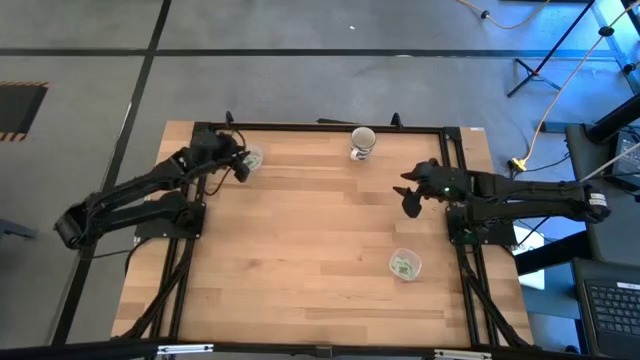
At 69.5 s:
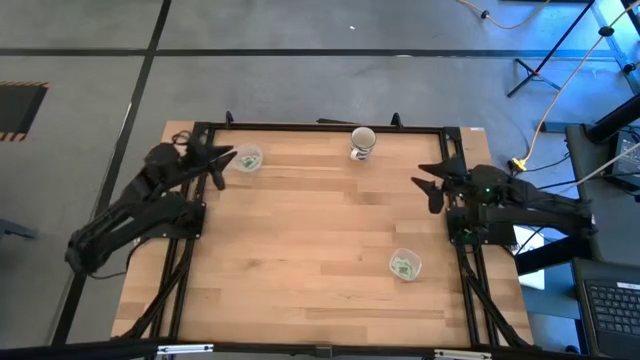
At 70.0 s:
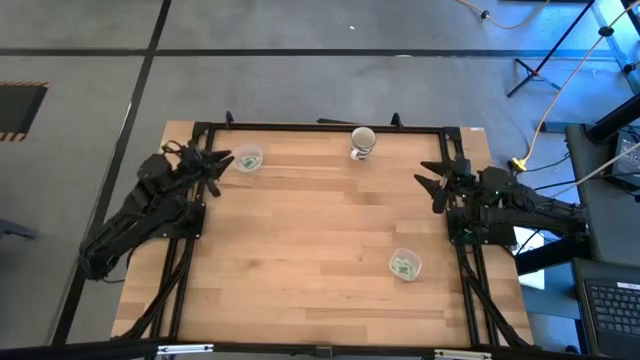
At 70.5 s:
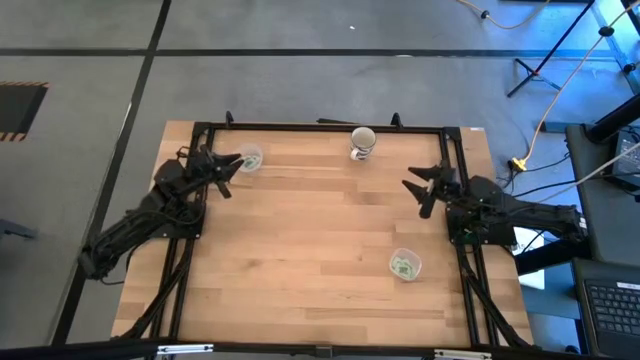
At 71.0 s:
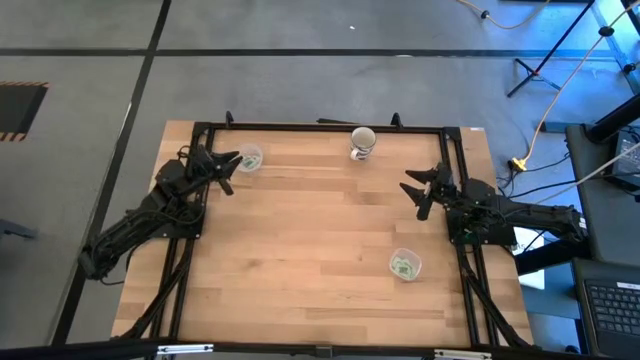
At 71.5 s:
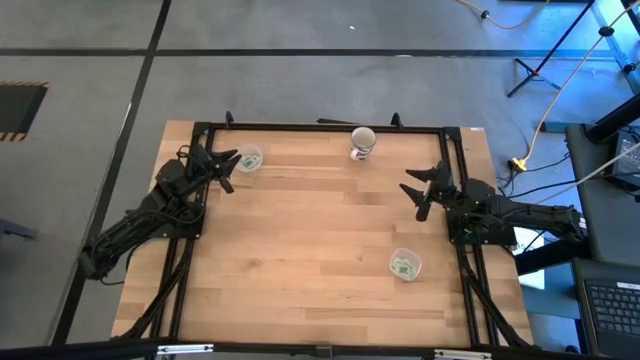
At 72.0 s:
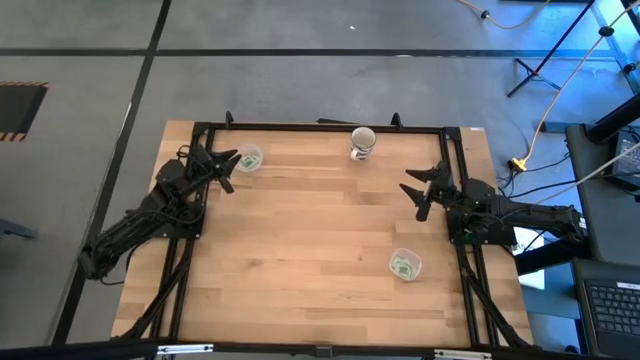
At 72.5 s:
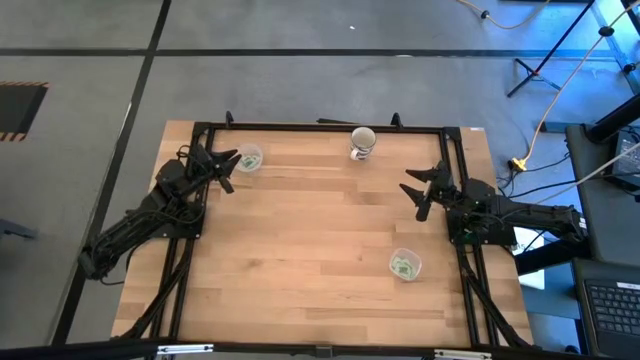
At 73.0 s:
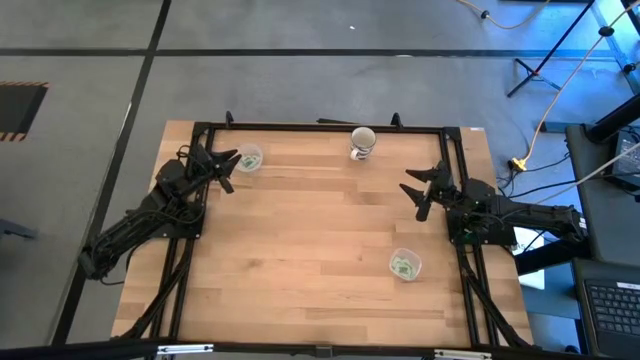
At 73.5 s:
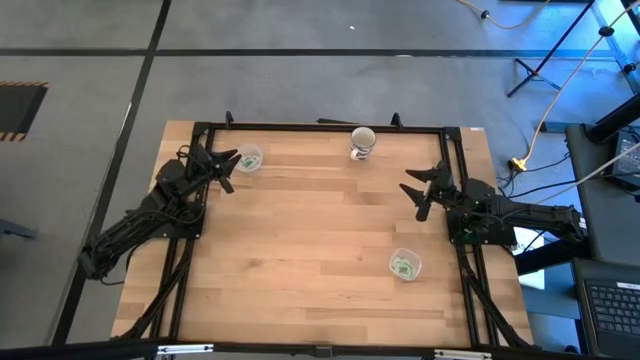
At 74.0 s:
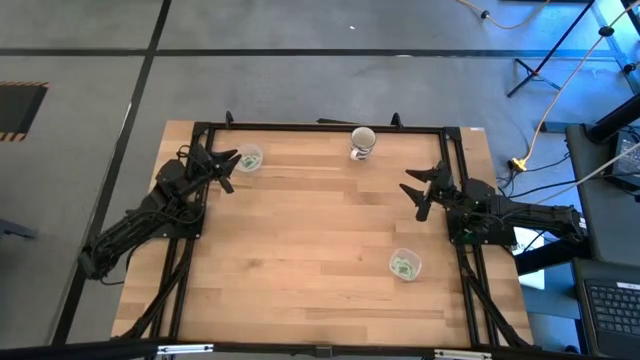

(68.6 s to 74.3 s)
Task: Pick and place items into bin
Return to Home Position

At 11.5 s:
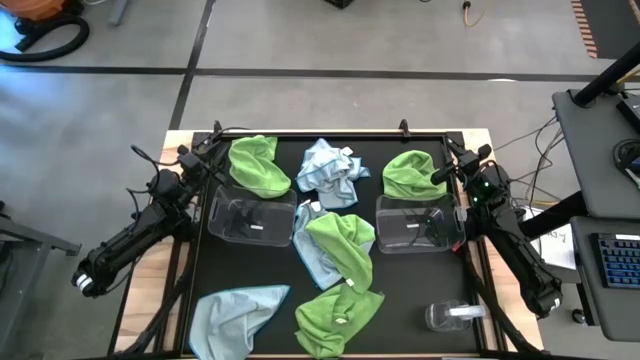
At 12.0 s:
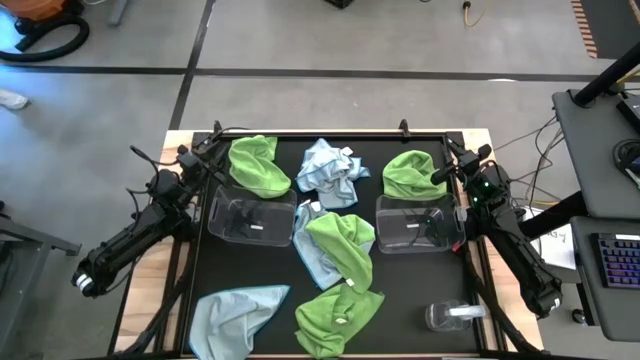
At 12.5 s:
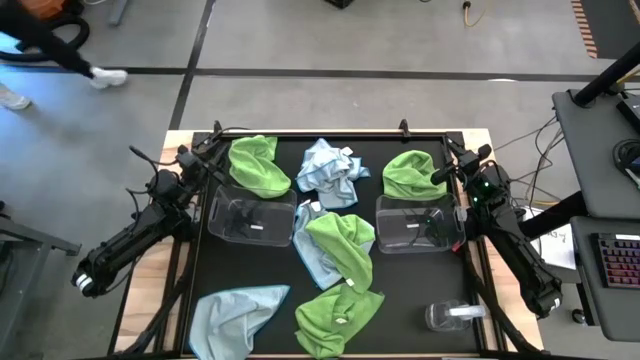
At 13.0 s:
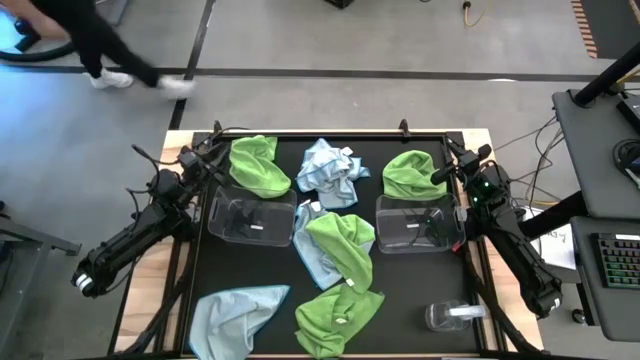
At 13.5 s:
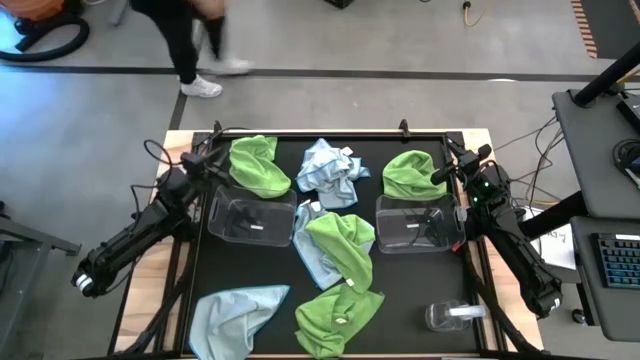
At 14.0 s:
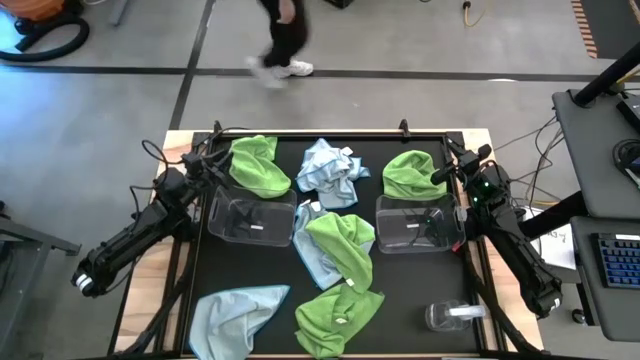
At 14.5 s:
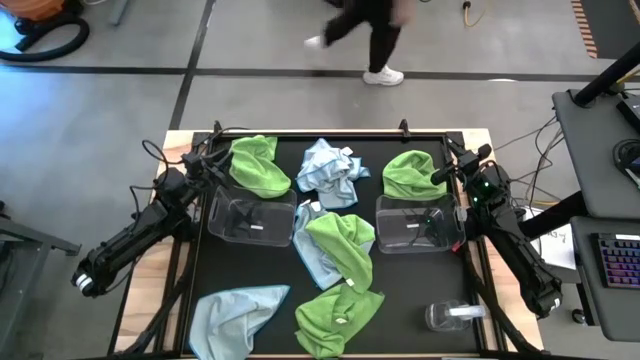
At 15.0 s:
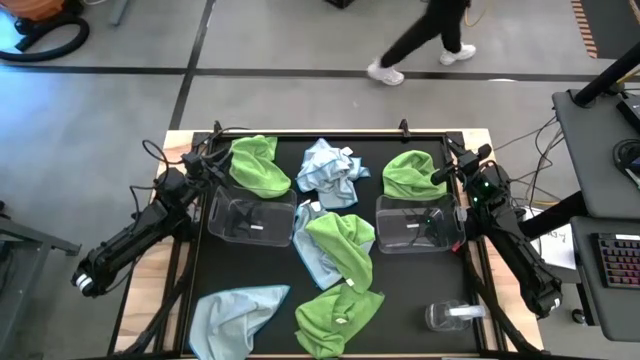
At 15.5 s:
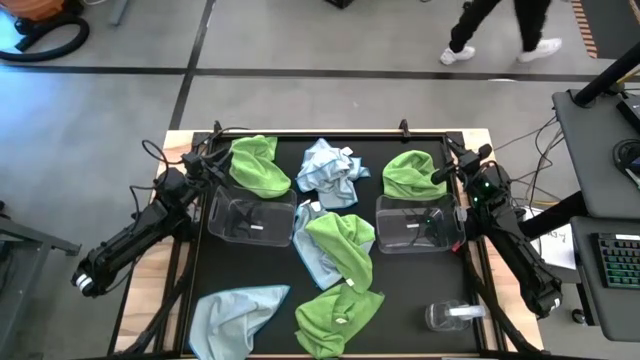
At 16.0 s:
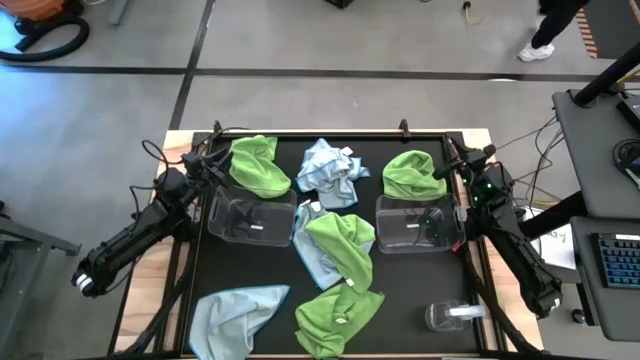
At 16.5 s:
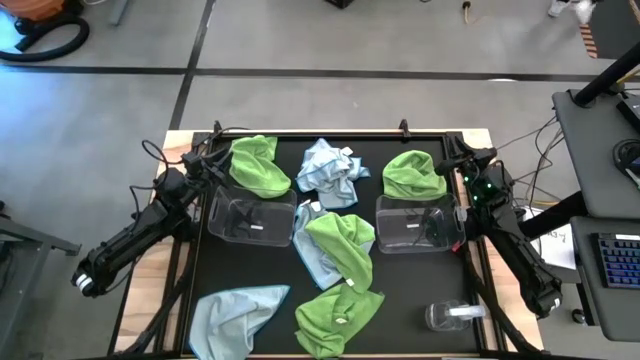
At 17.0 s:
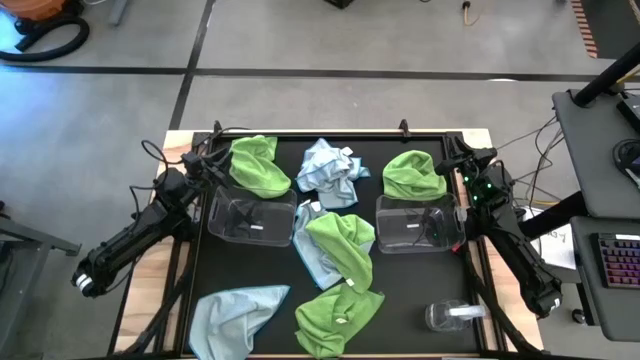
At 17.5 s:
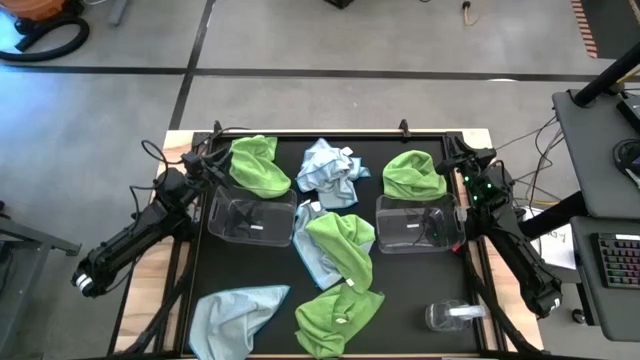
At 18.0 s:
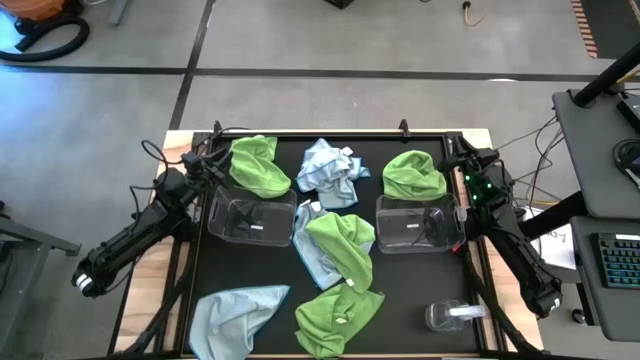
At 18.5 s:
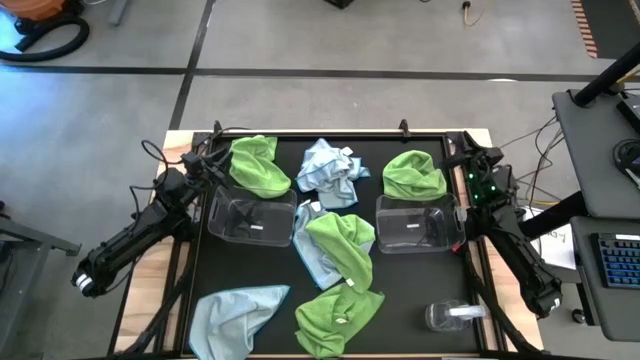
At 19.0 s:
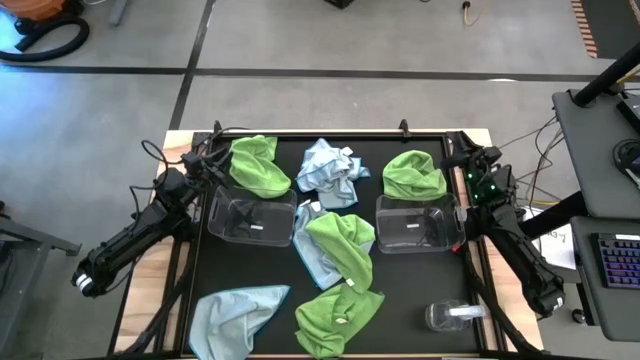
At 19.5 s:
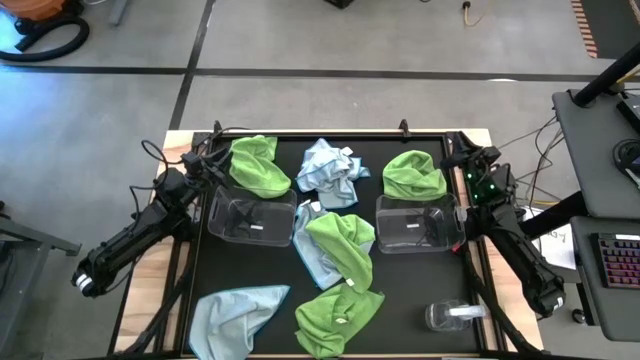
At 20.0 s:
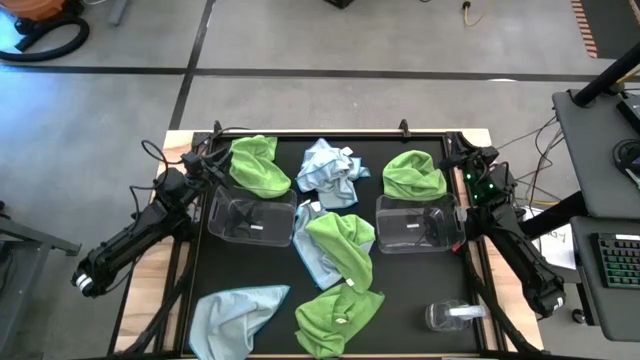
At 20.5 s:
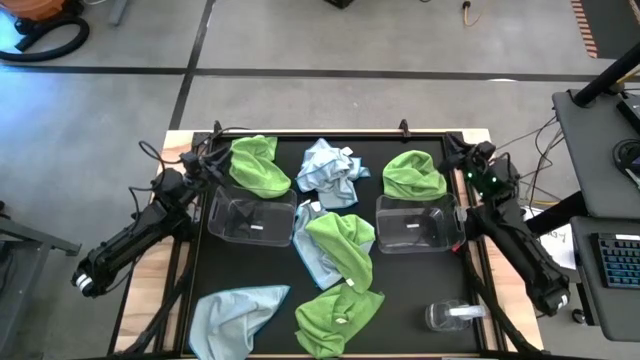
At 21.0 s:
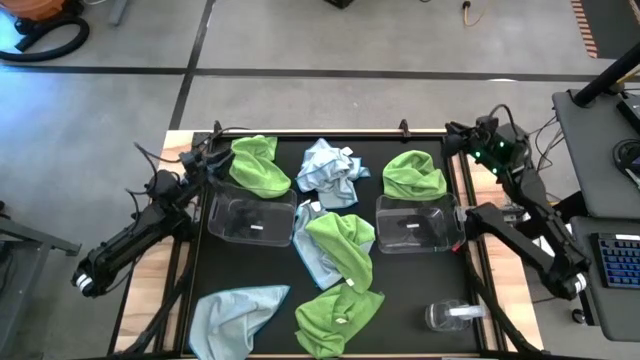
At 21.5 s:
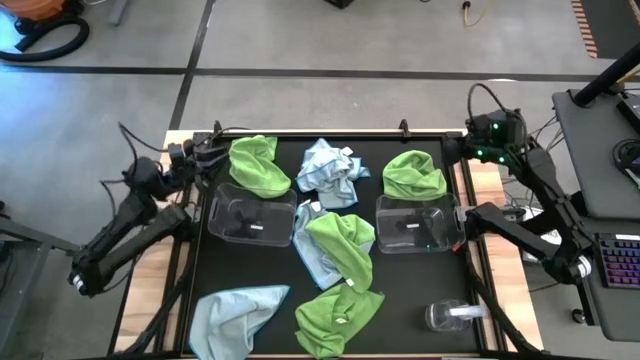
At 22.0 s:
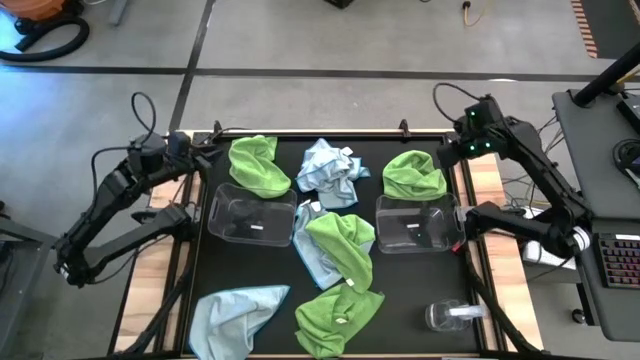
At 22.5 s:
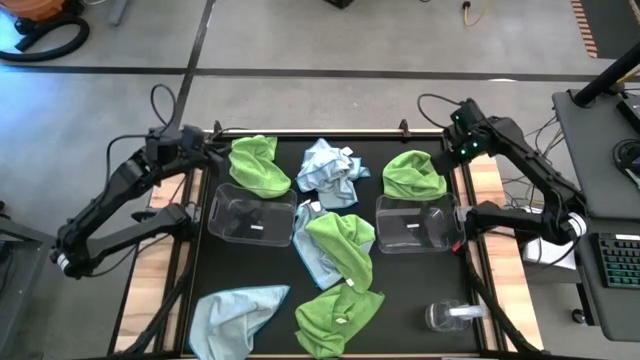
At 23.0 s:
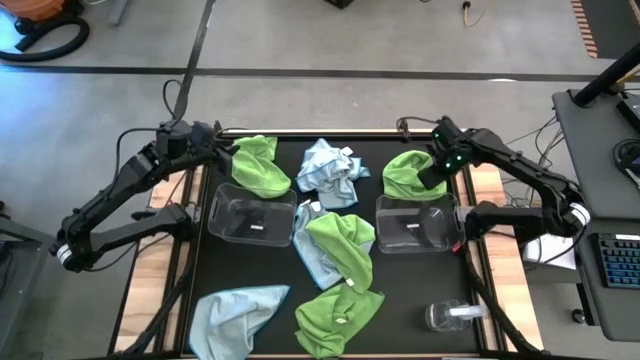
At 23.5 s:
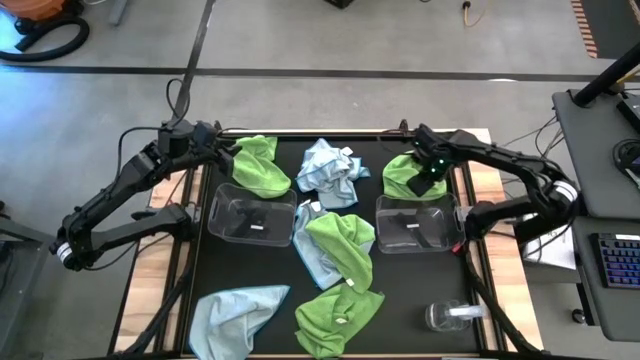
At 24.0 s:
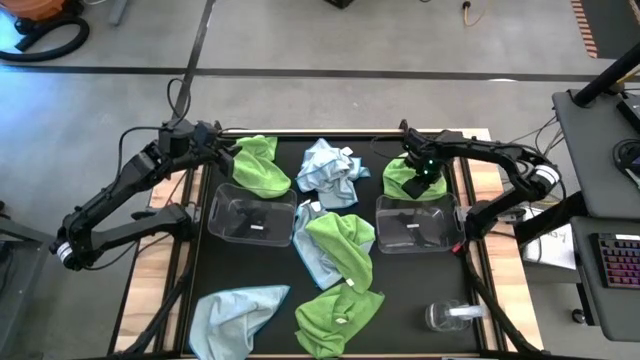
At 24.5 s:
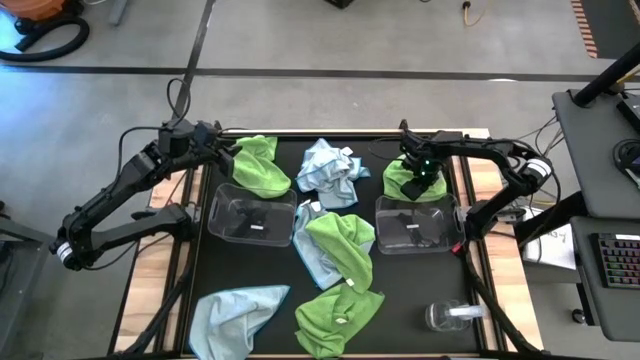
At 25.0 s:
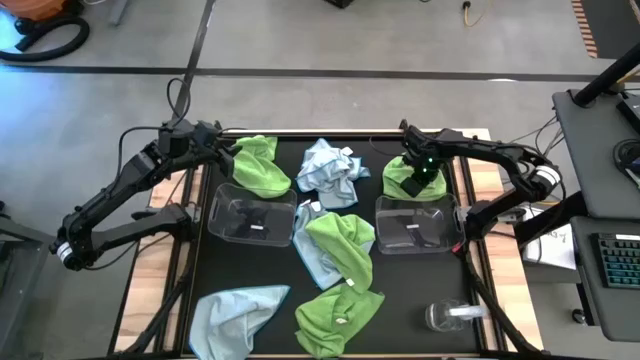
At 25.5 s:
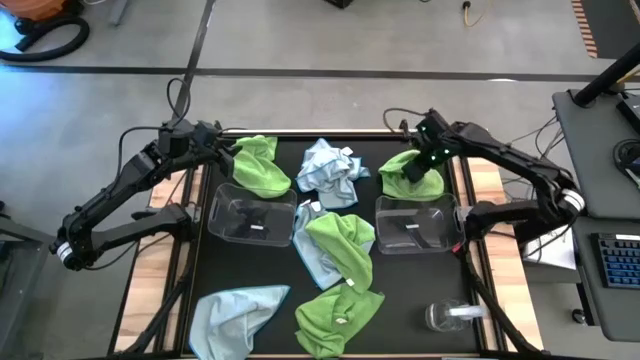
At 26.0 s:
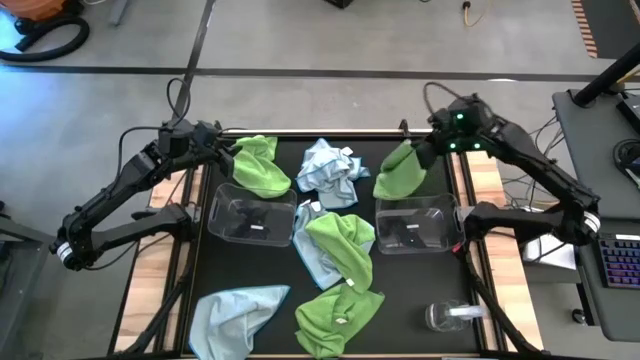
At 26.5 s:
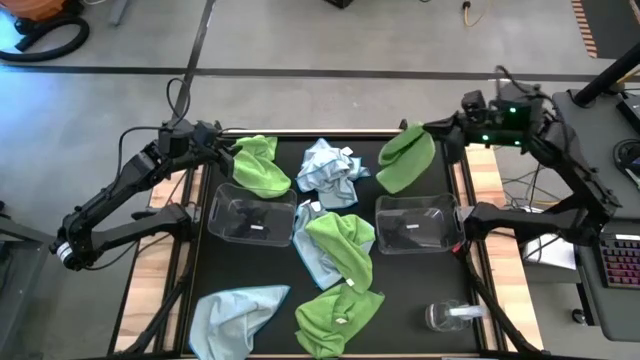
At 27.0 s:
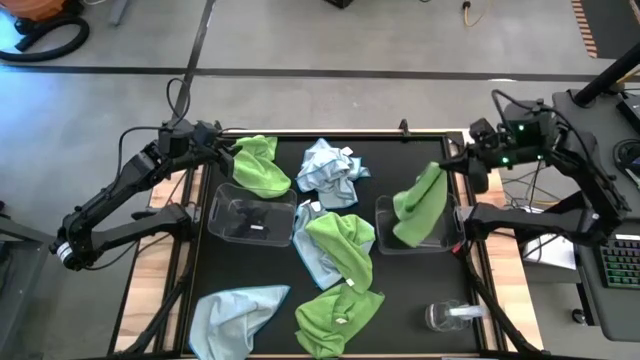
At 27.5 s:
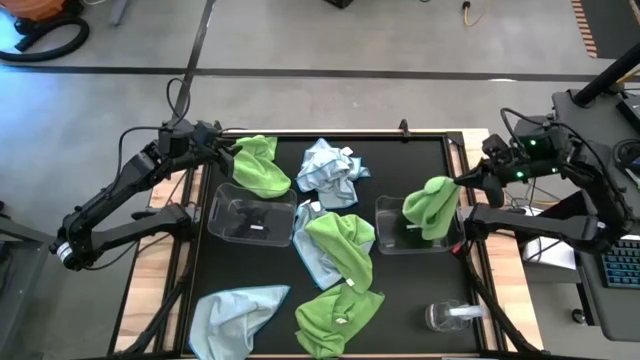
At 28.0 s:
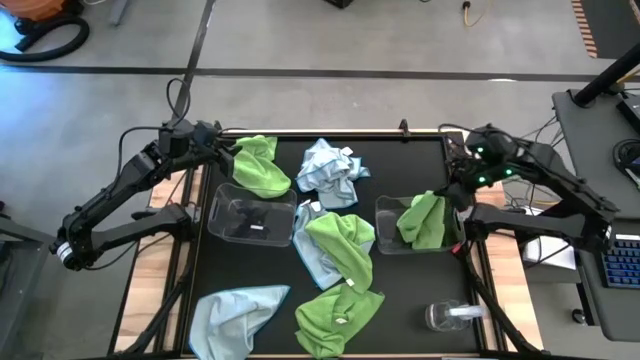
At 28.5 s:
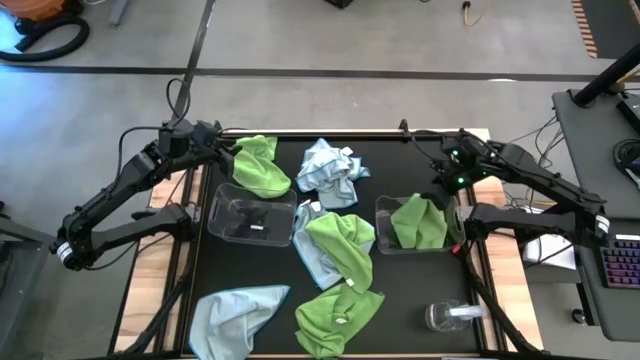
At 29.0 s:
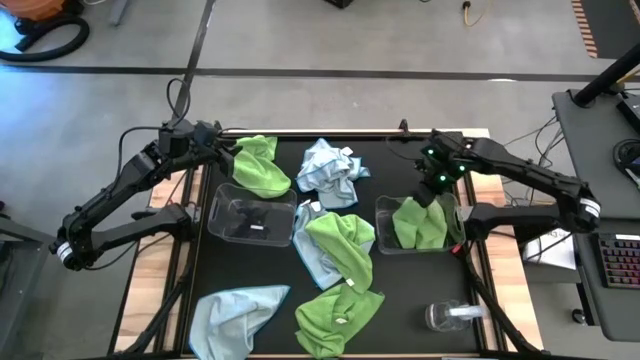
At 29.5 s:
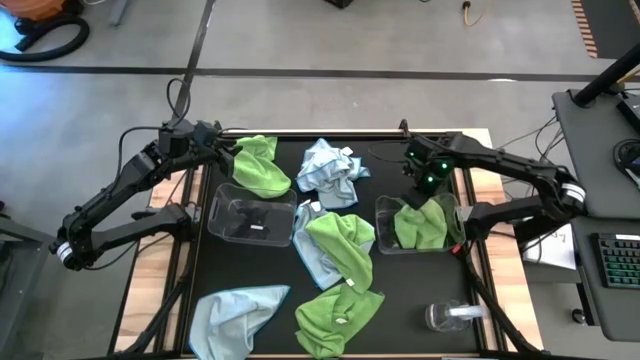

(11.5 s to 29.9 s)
Task: Sort microfiber towel by color & place in baskets
Put the green towel into the right transparent bin
